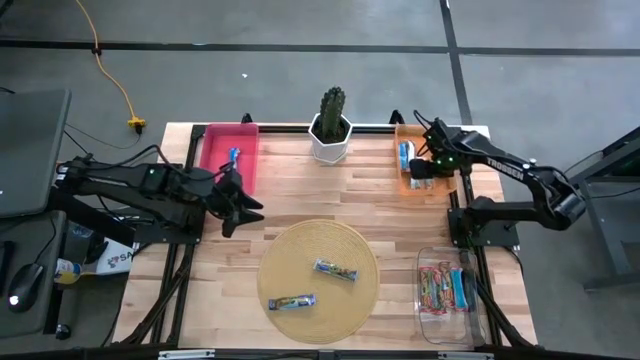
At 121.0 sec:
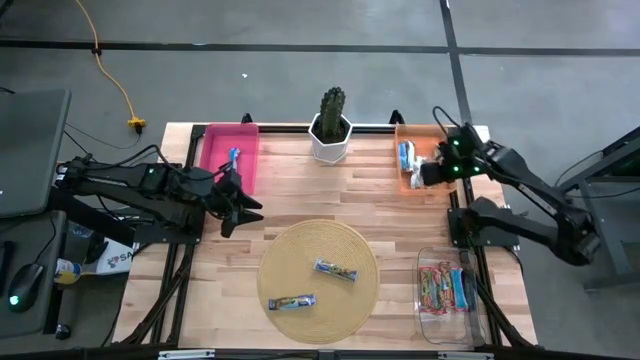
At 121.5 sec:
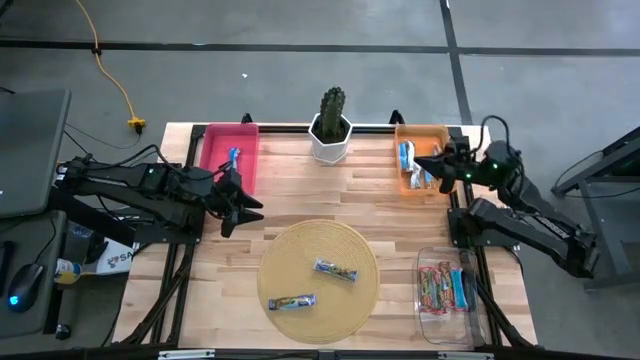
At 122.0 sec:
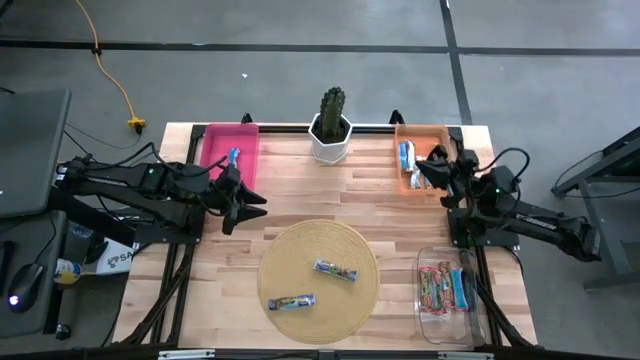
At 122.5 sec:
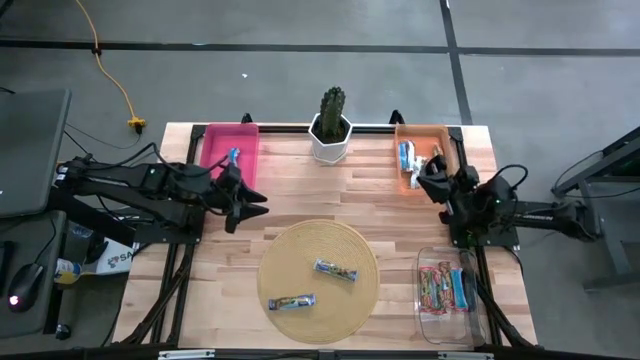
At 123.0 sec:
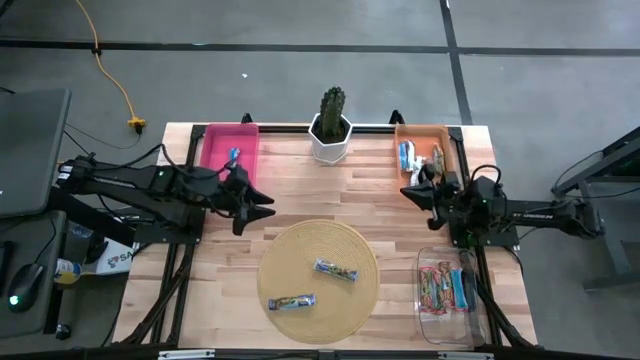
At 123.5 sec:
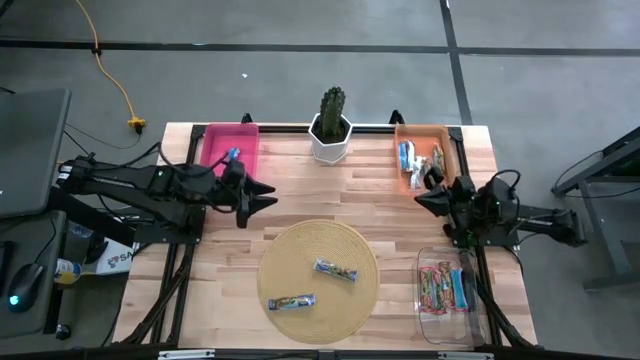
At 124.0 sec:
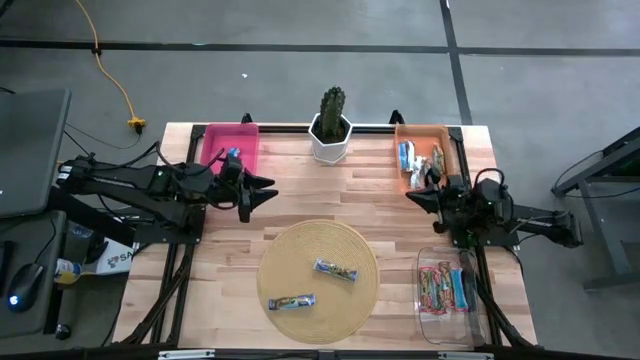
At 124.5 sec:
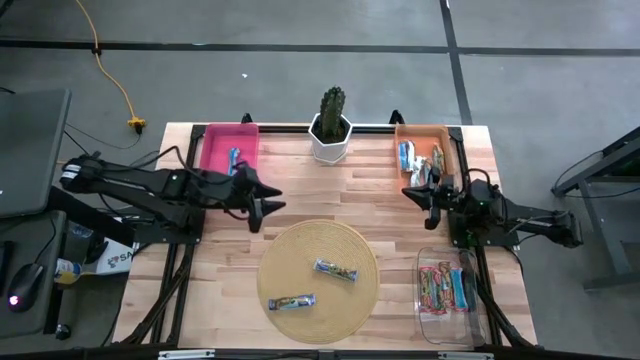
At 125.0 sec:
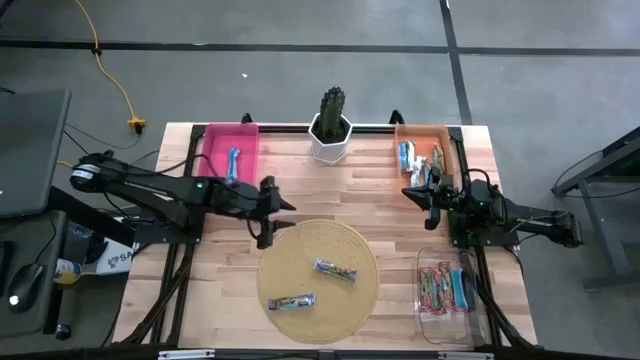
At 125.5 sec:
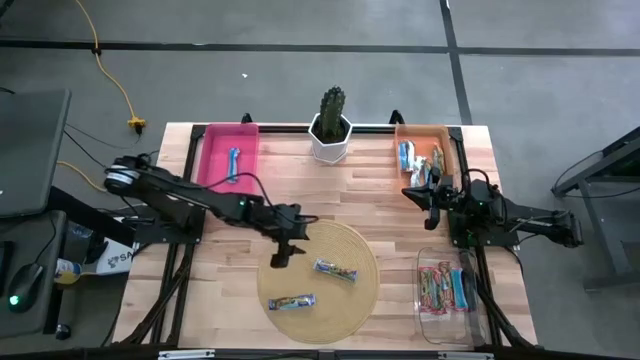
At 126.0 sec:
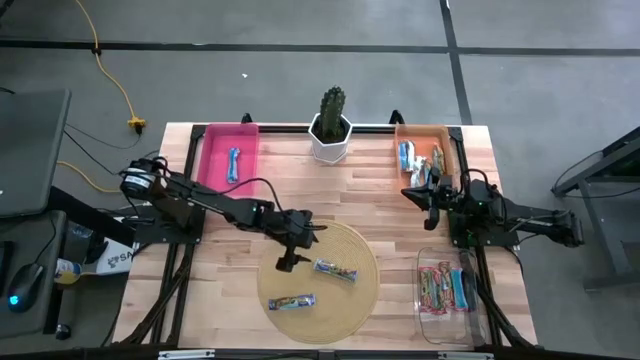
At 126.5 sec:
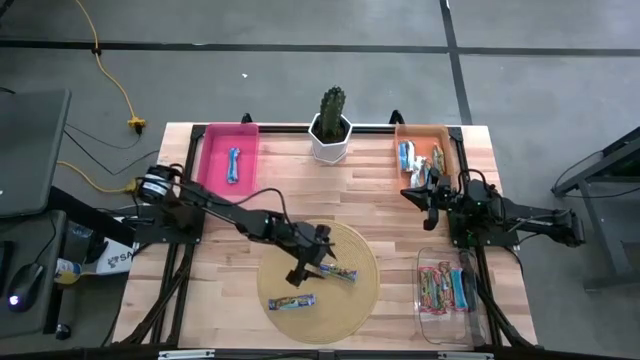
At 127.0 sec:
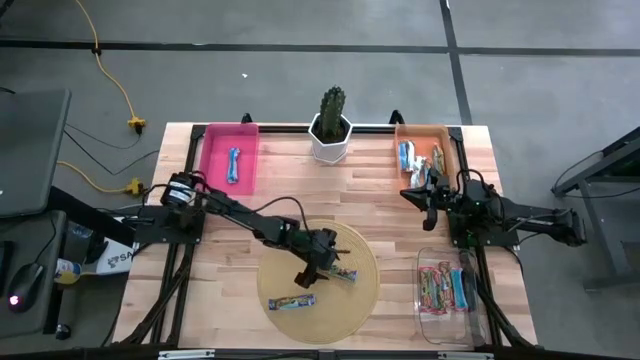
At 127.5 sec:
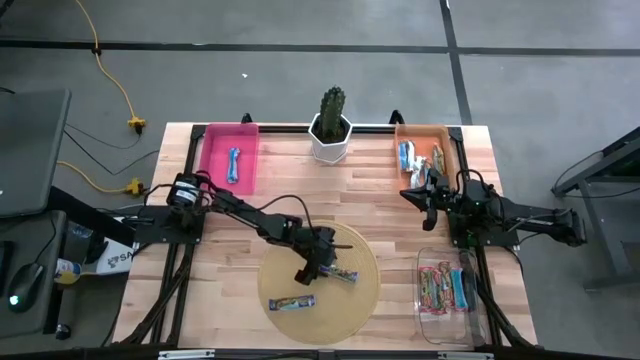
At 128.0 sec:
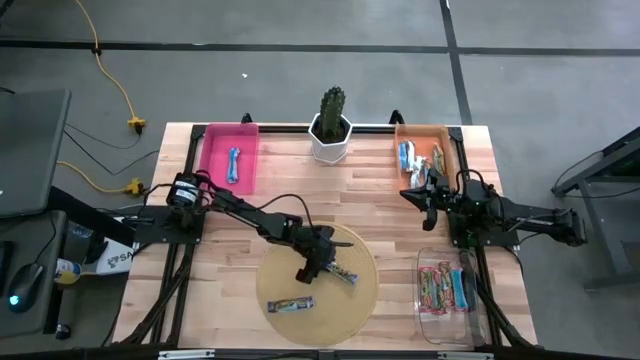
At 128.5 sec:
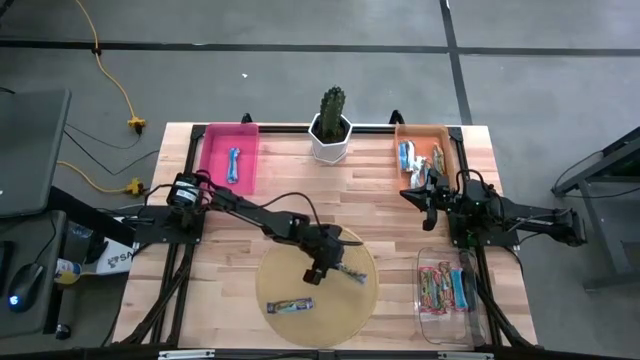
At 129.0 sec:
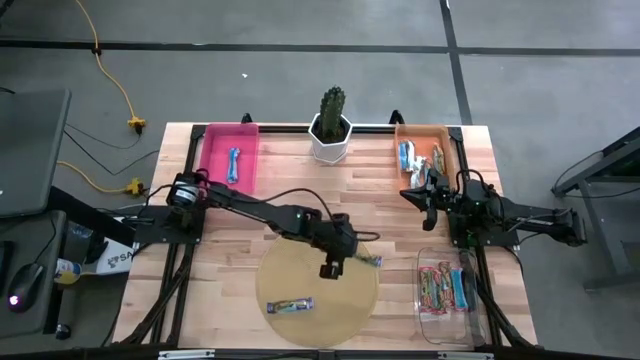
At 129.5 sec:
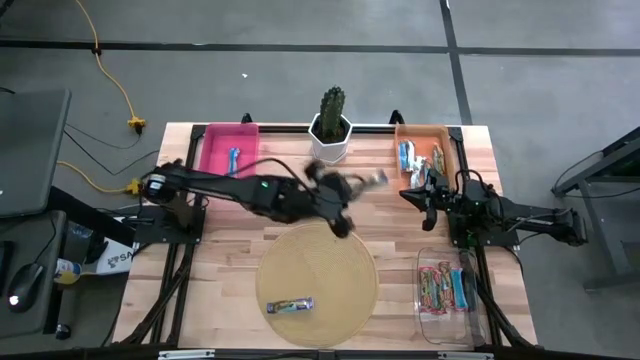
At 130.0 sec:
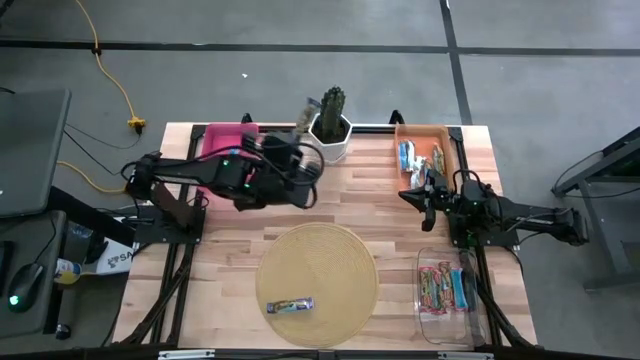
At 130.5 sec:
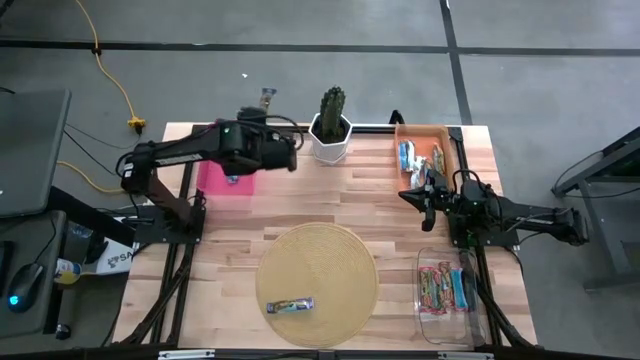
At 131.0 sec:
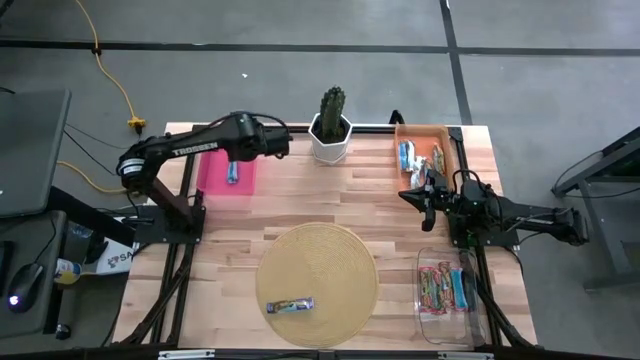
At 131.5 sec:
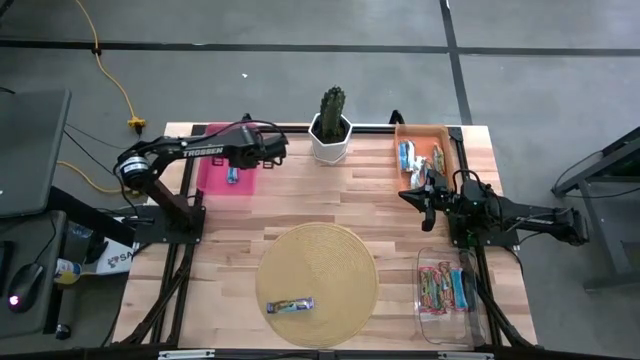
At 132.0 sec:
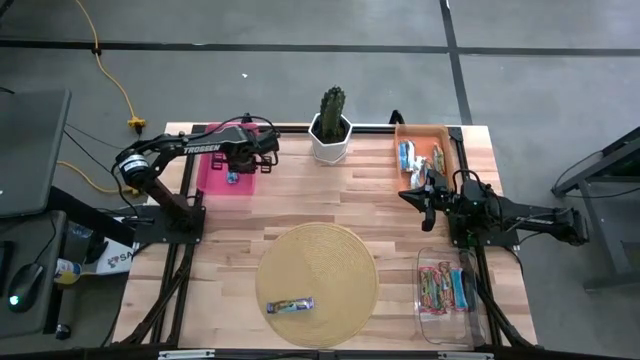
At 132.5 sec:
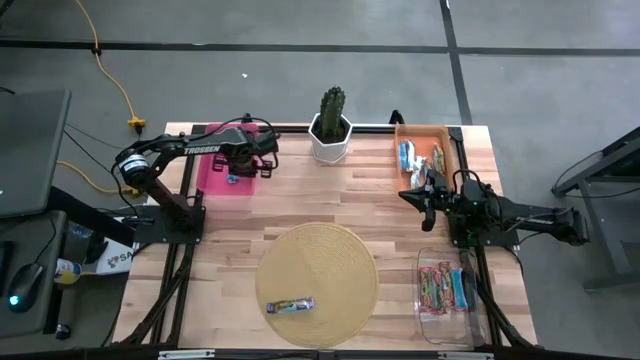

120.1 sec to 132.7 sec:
Task: Pick and place Granola Bars by type
Put the blue granola bar into the red bin

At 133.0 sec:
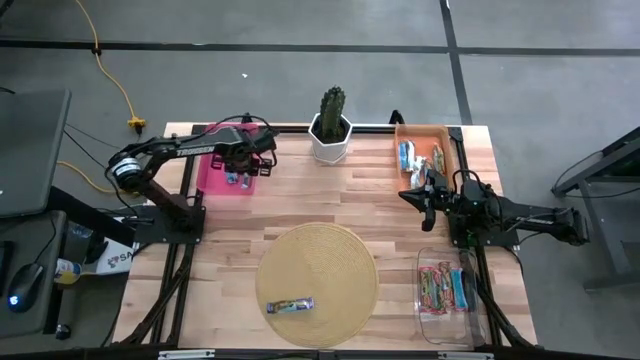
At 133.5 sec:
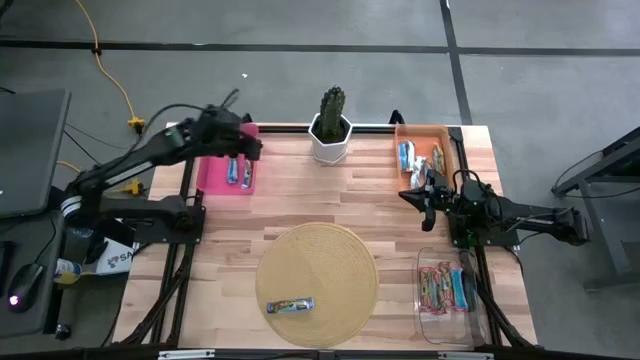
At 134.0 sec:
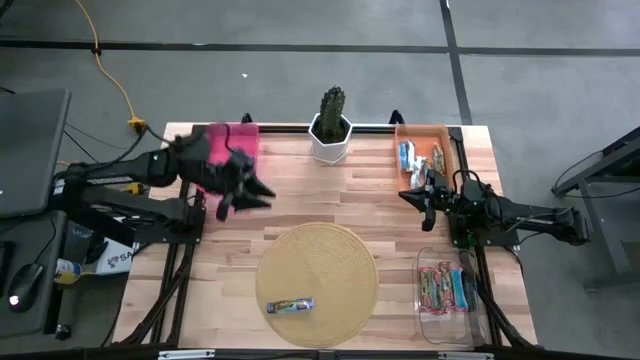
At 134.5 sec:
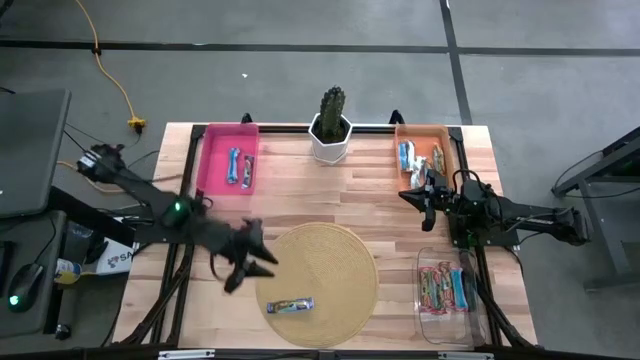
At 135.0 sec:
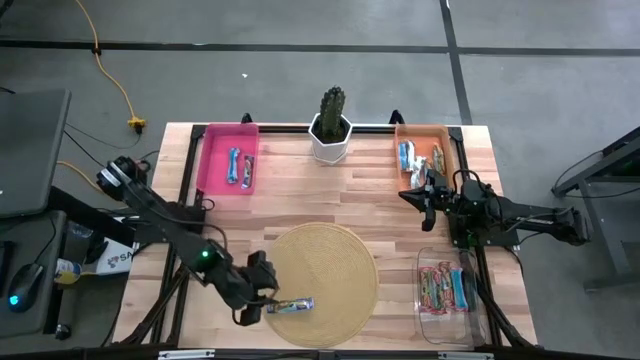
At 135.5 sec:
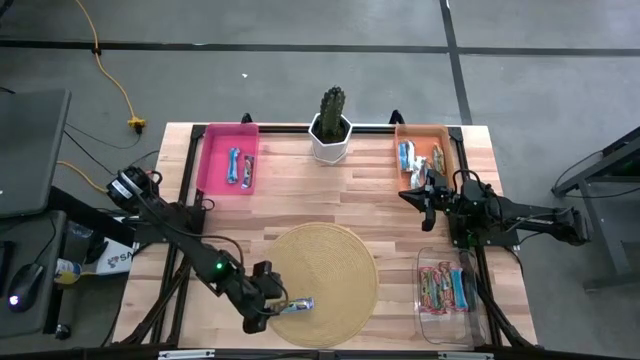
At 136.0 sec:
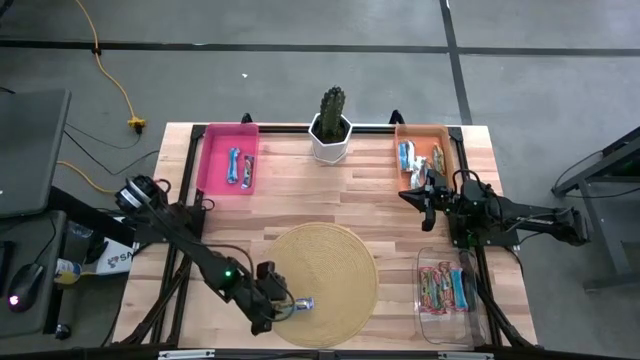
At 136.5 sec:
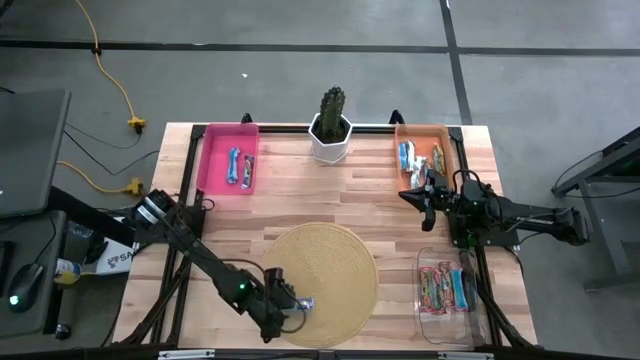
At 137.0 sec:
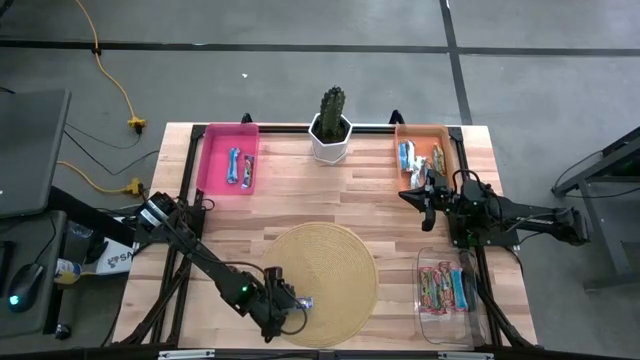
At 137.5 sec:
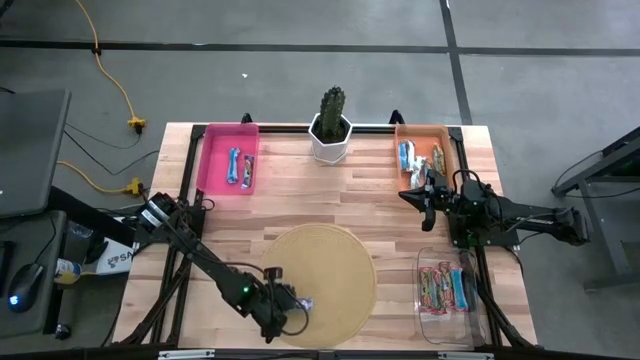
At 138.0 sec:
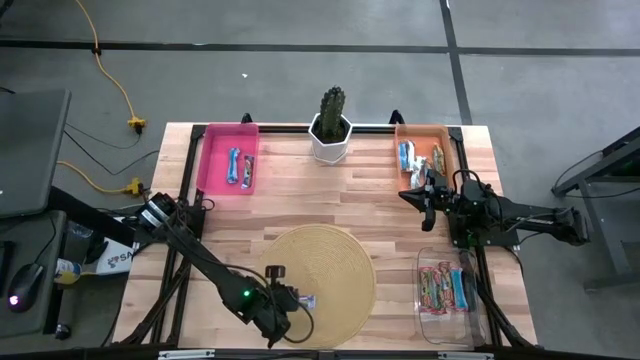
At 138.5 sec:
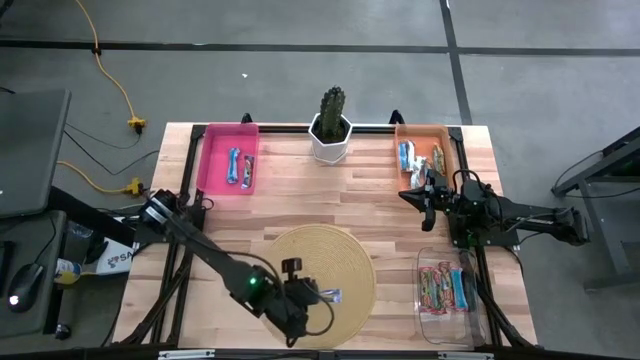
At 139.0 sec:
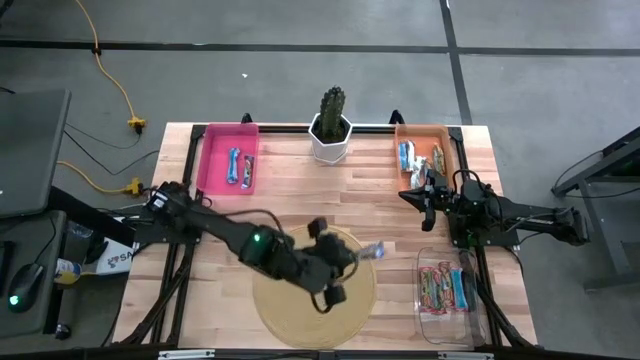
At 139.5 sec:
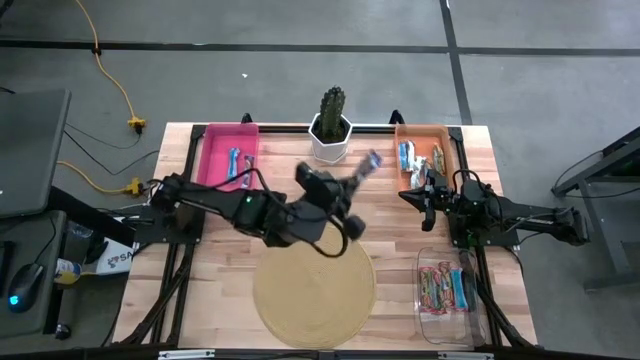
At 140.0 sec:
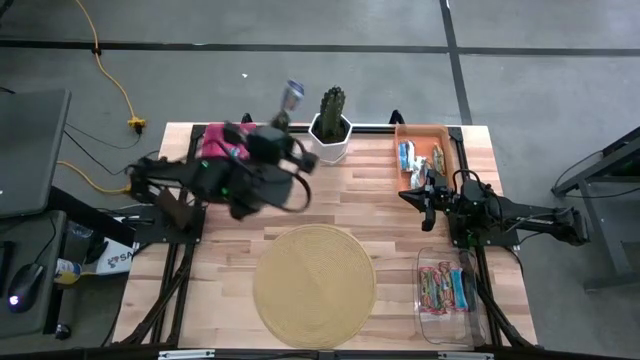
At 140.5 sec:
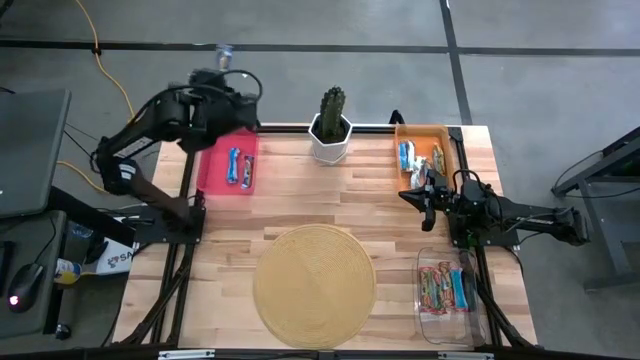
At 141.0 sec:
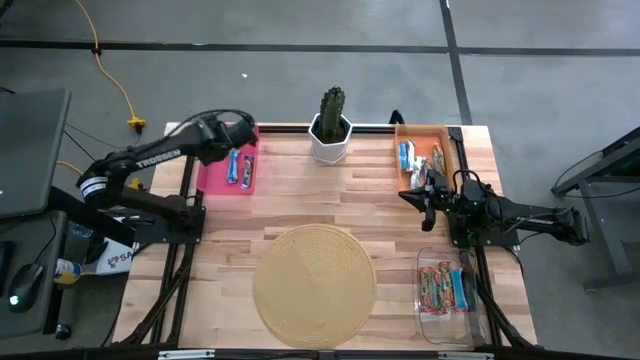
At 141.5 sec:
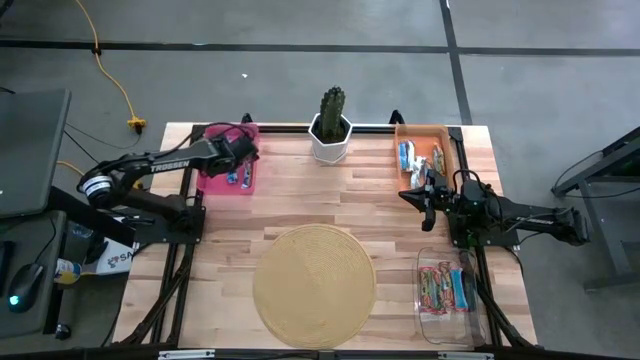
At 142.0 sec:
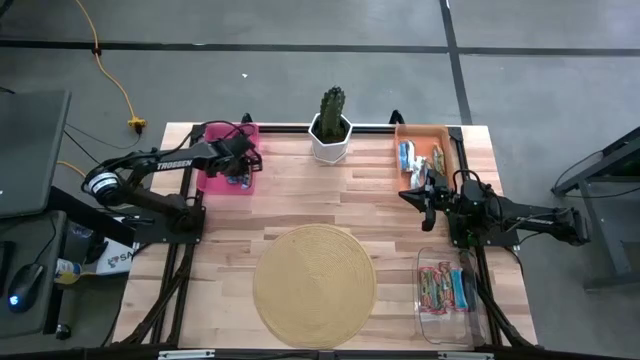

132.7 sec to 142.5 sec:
Put the blue granola bar into the red bin
